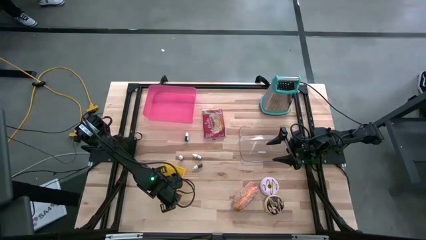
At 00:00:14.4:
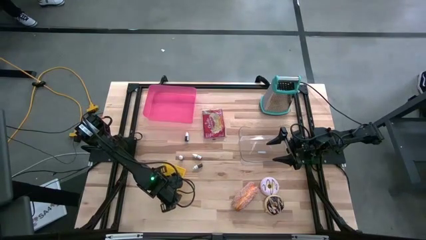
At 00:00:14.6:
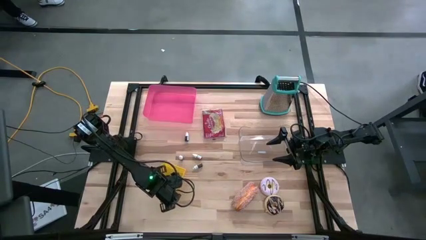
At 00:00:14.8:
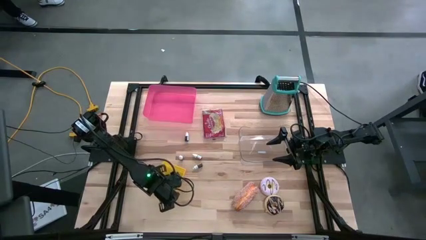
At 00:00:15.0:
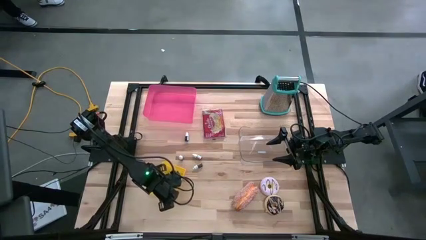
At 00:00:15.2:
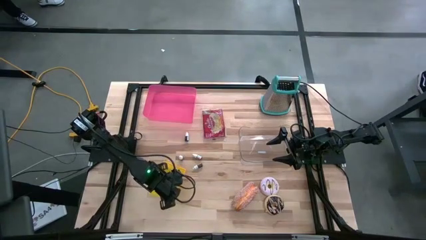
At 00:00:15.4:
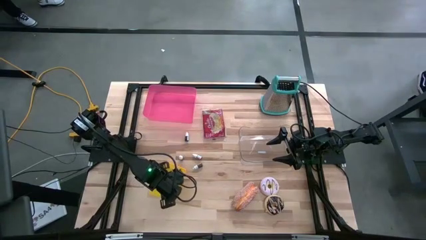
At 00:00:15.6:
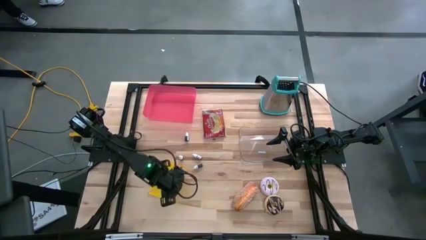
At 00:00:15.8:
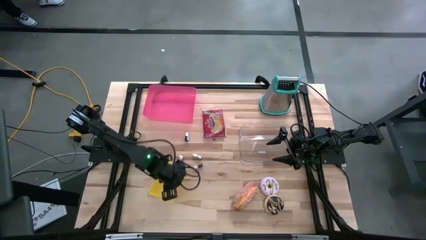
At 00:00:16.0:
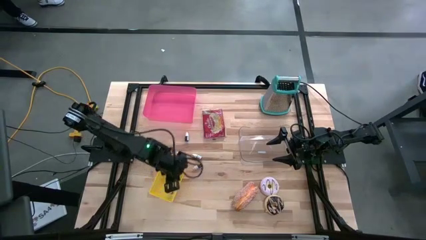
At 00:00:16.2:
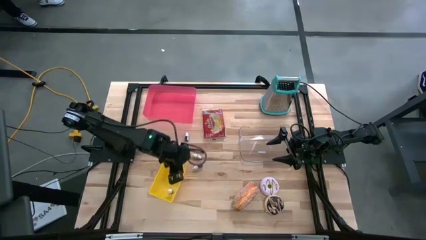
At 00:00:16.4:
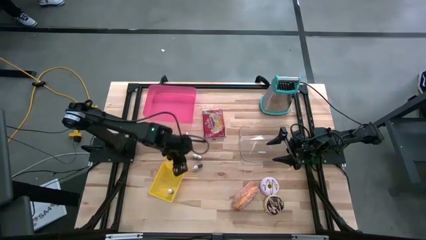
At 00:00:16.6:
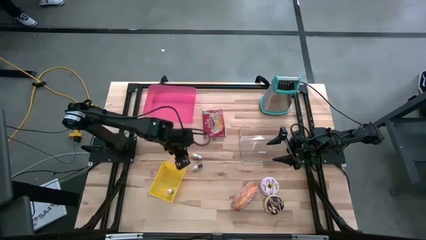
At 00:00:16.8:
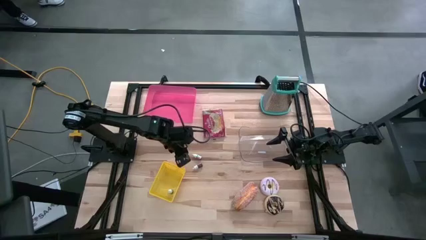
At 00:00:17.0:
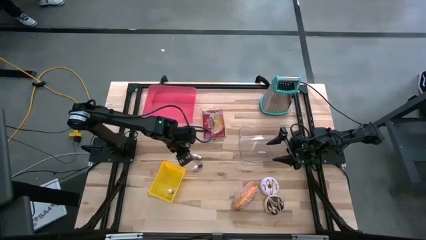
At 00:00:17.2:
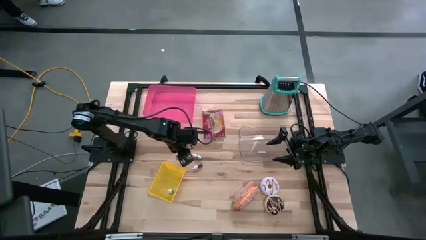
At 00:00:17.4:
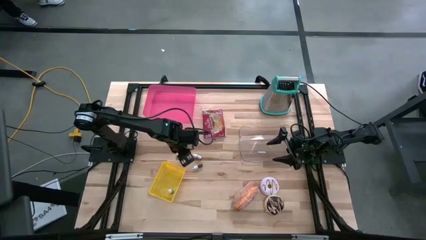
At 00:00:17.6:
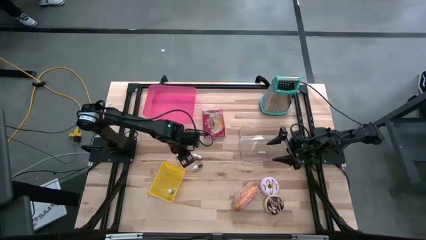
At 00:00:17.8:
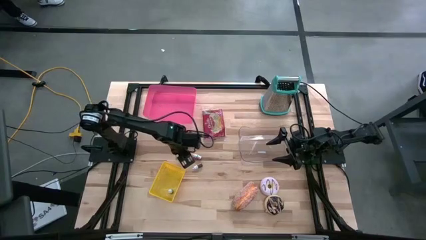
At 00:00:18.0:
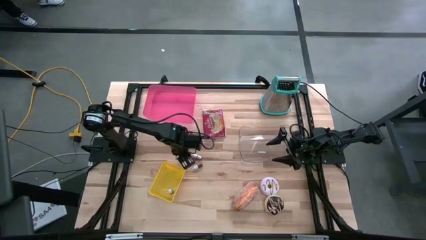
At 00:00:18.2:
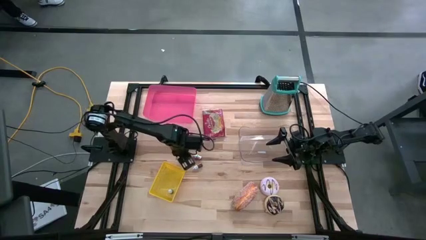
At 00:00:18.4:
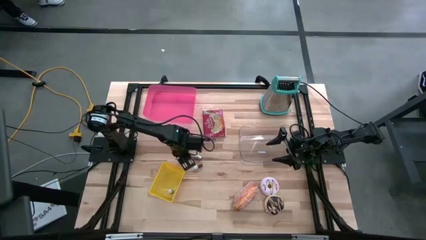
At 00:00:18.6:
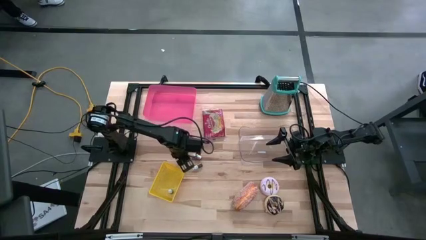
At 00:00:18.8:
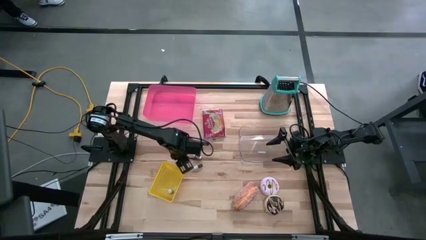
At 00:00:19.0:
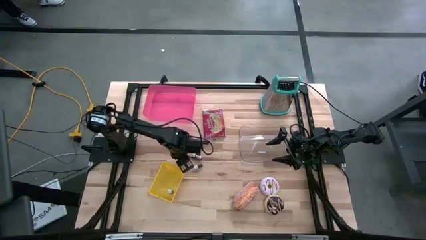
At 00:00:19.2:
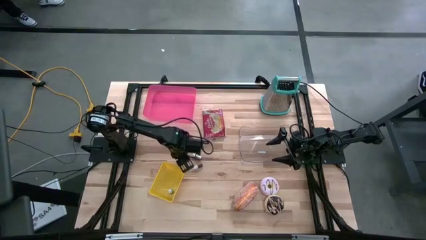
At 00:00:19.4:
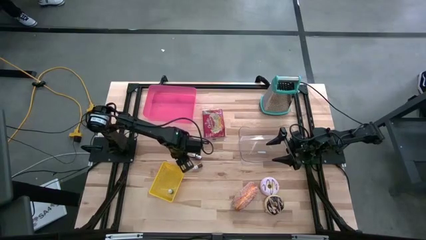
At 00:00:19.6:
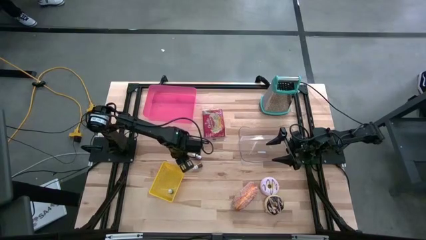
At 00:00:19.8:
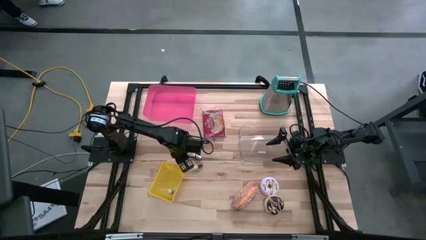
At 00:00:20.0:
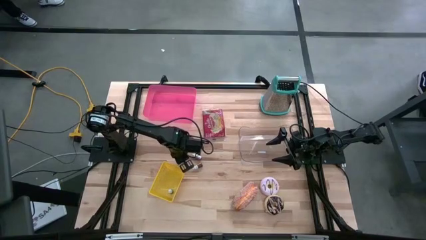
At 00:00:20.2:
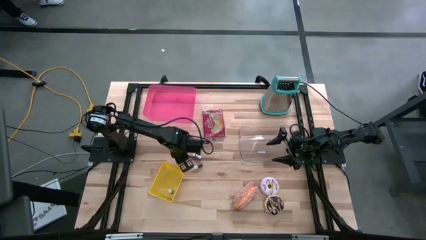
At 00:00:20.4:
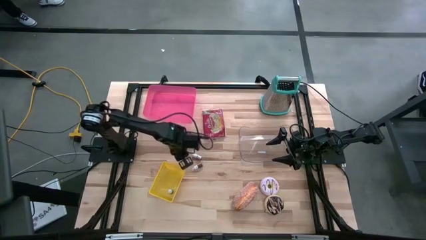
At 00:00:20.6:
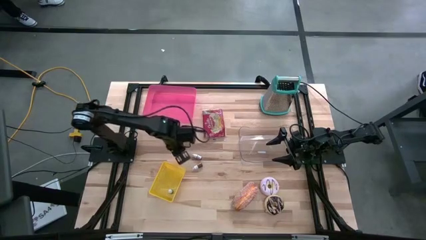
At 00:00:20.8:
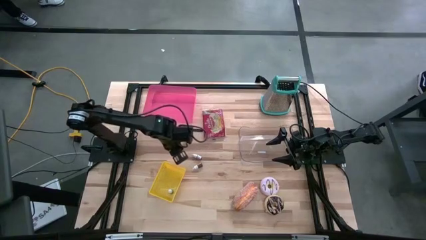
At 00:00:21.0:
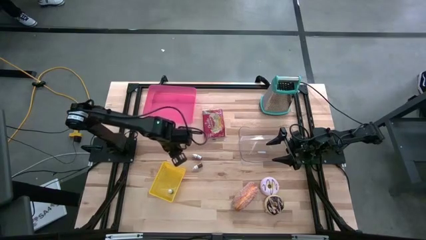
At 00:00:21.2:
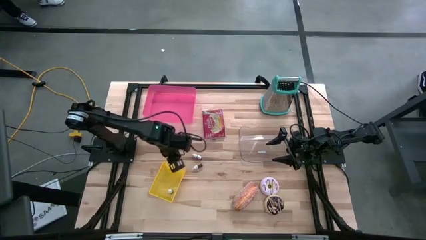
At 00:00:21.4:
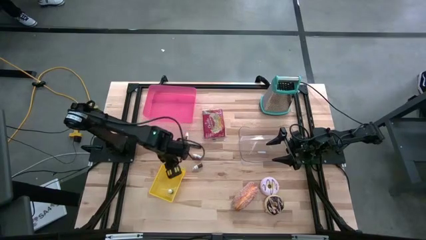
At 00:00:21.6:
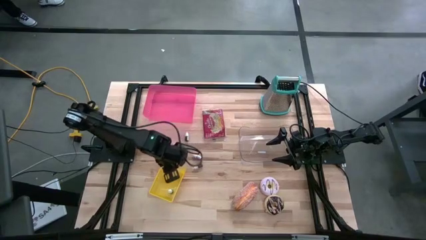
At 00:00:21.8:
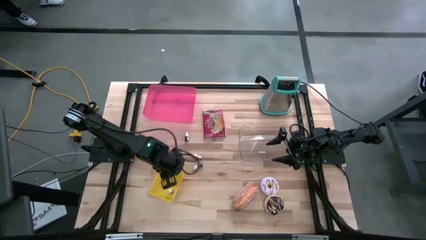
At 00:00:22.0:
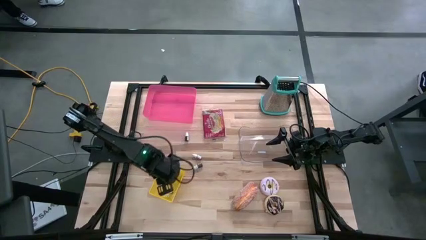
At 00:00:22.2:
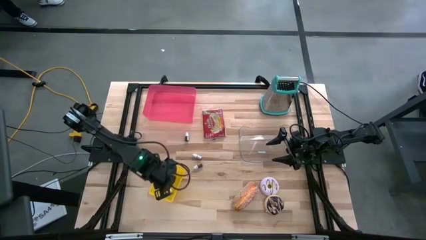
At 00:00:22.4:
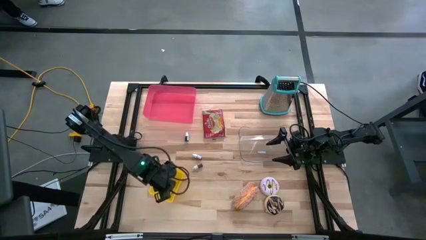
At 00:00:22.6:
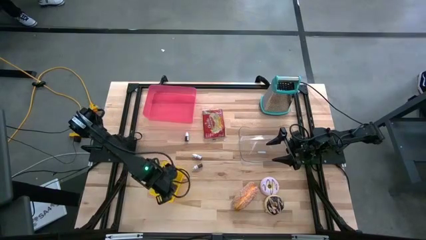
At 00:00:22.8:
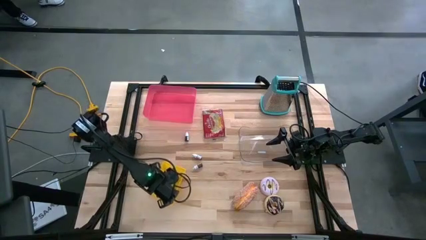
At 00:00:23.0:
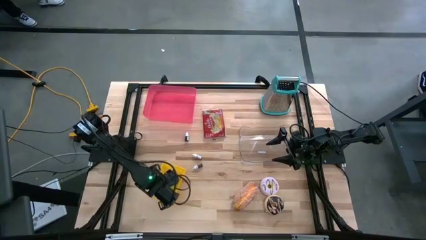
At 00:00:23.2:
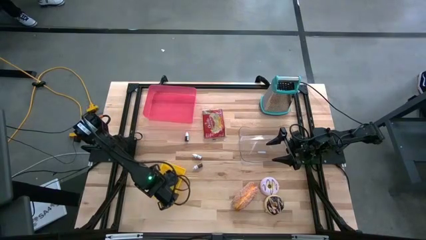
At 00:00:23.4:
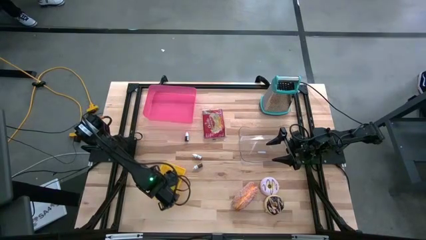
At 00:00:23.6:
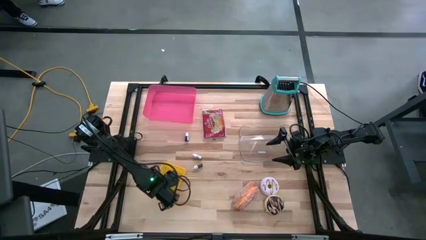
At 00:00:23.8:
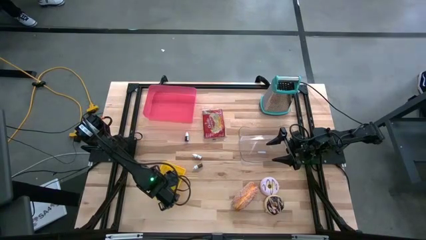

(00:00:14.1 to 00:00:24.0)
Put the left orange food coloring bottle into the yellow bin

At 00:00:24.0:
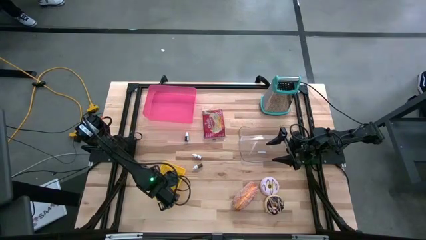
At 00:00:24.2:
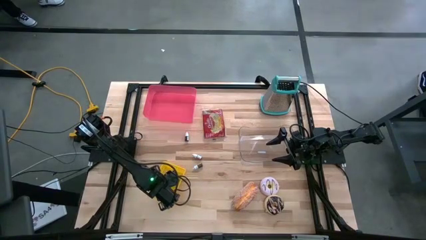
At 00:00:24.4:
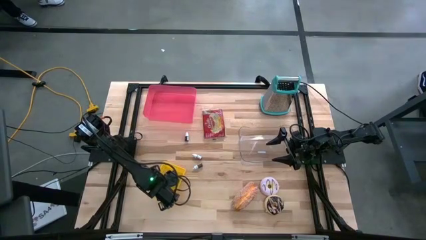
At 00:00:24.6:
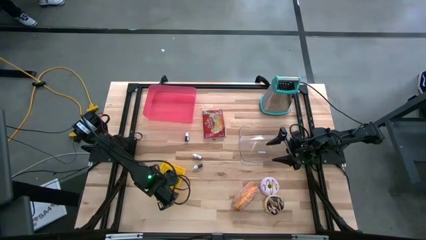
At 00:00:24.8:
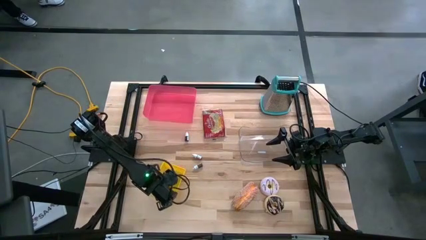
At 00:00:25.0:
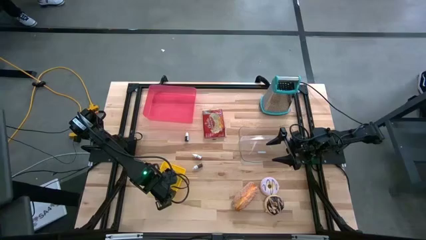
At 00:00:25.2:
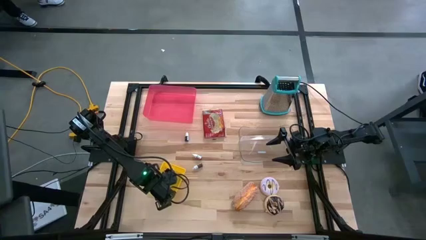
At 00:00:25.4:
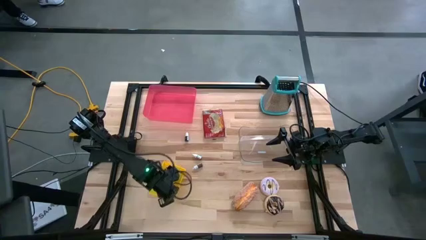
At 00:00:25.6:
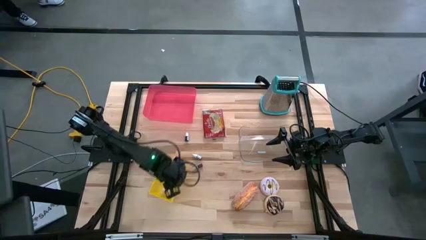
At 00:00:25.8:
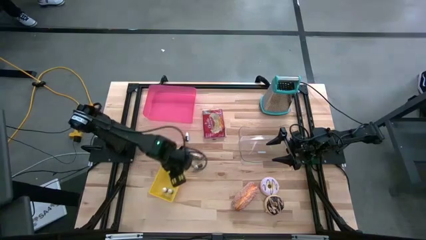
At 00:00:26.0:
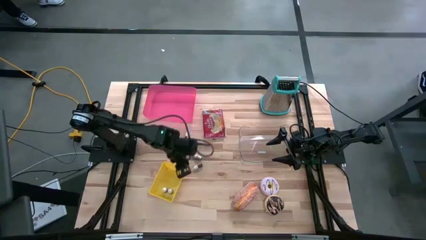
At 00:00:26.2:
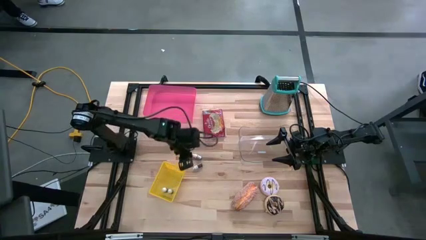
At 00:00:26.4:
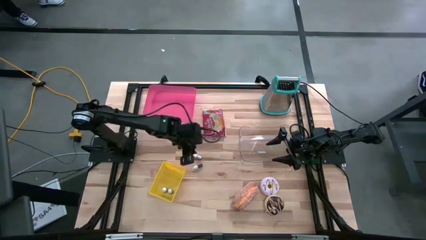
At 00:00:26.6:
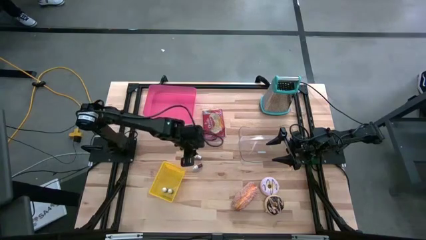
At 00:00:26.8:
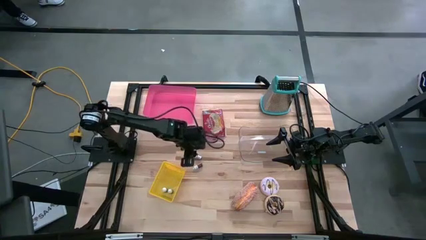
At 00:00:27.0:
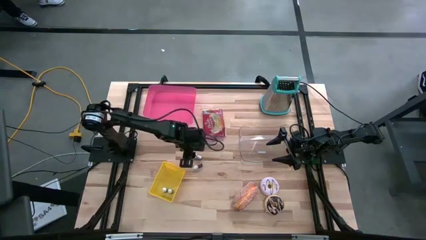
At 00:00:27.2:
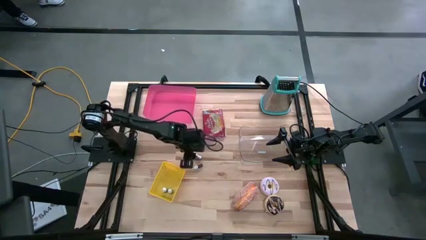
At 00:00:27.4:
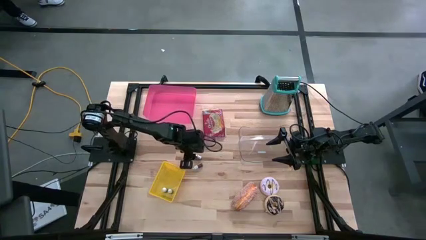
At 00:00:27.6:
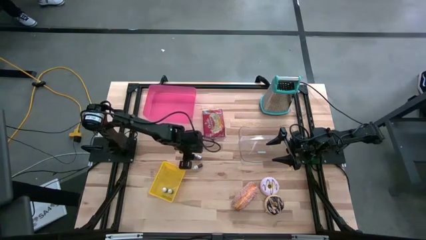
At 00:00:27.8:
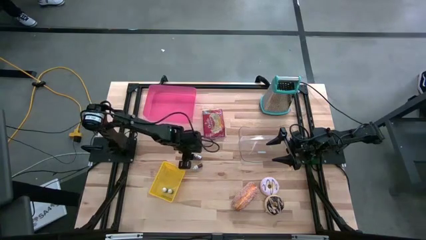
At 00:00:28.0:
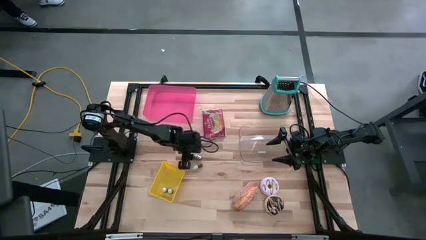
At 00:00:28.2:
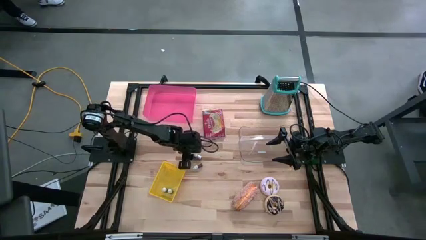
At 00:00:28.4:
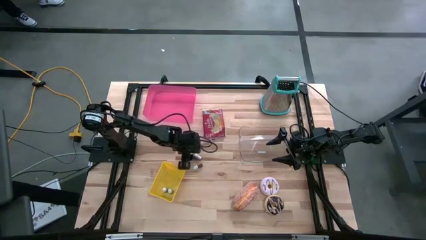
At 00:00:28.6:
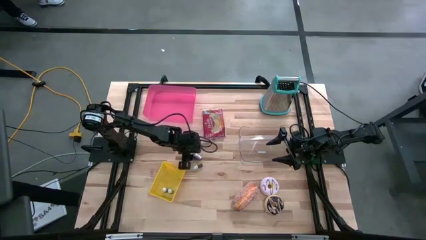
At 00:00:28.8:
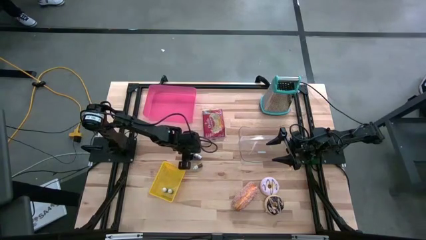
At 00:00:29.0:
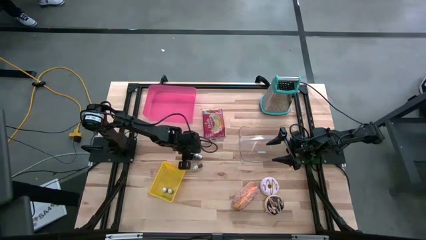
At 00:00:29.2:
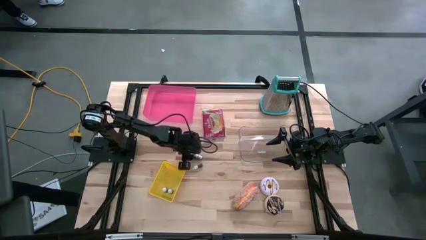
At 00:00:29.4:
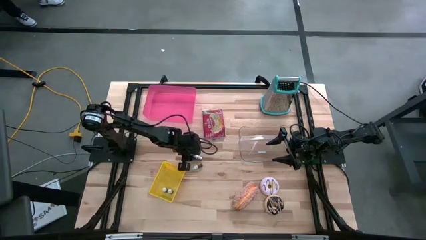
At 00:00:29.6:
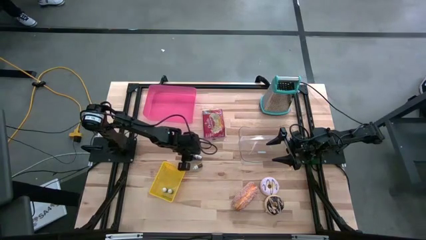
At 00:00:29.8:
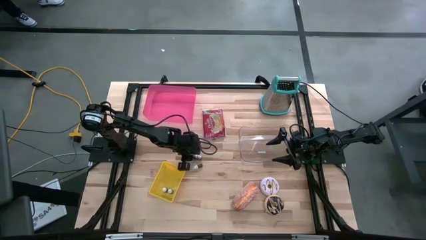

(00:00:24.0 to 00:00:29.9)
Put the orange food coloring bottle into the yellow bin
